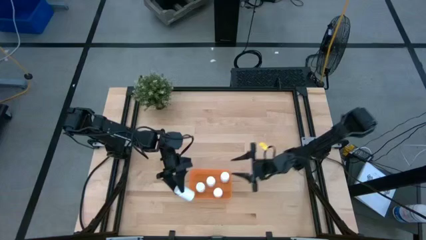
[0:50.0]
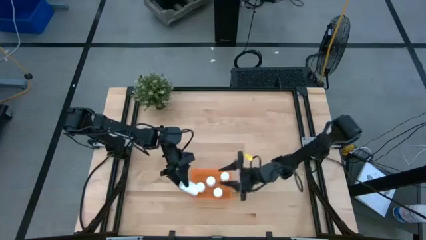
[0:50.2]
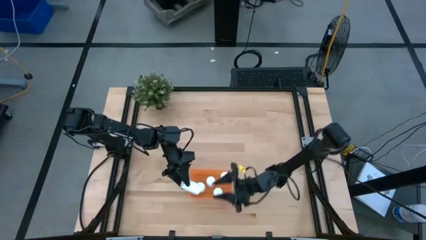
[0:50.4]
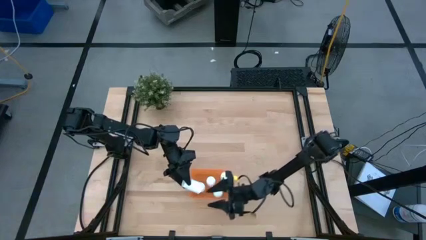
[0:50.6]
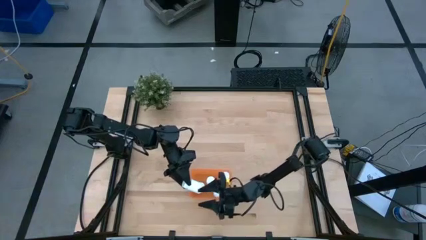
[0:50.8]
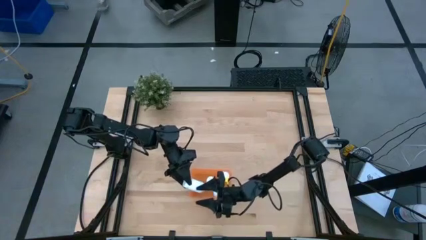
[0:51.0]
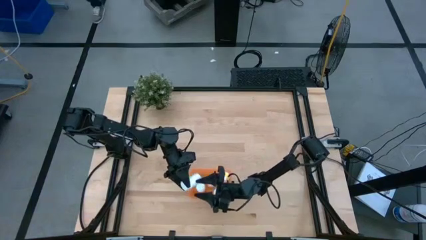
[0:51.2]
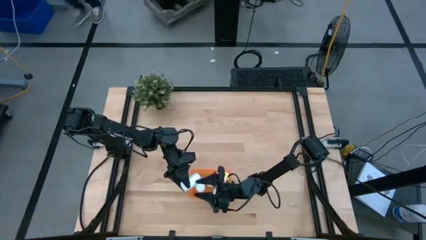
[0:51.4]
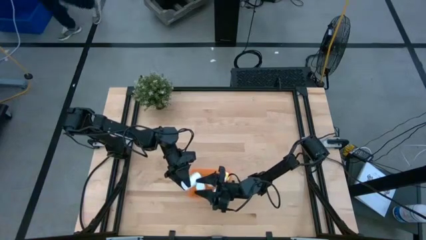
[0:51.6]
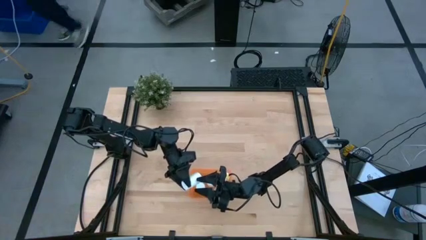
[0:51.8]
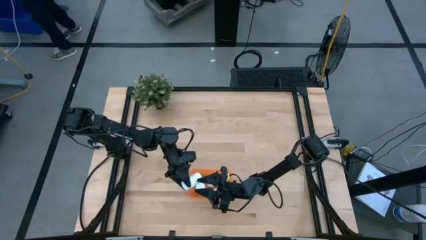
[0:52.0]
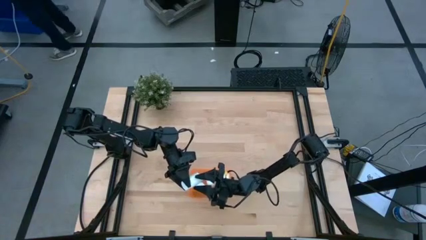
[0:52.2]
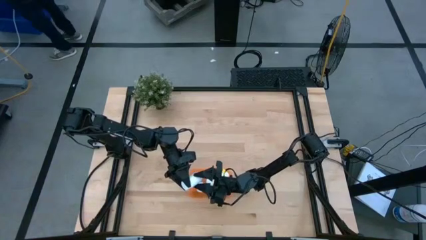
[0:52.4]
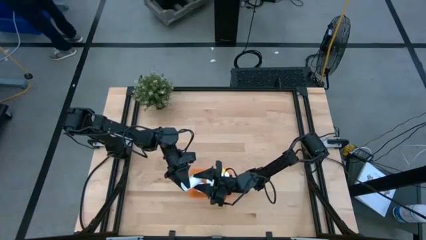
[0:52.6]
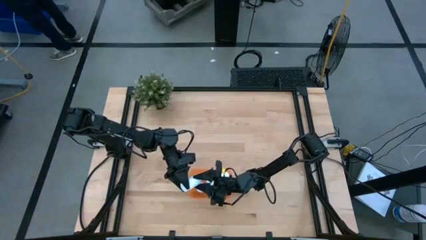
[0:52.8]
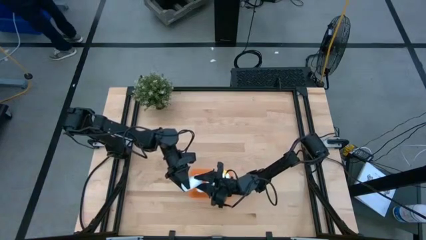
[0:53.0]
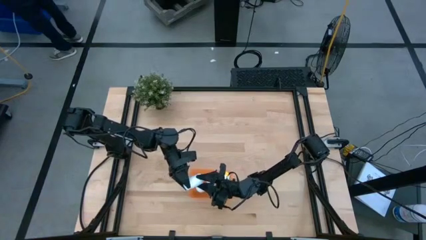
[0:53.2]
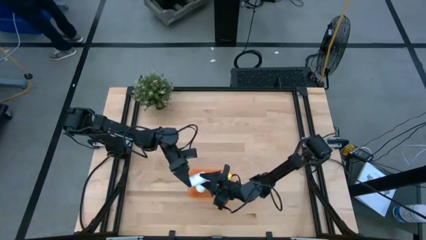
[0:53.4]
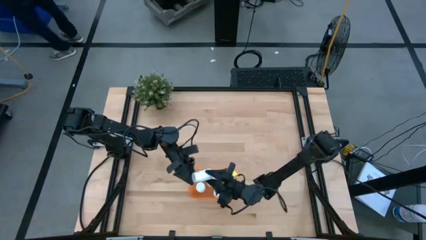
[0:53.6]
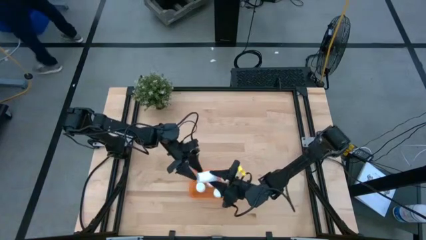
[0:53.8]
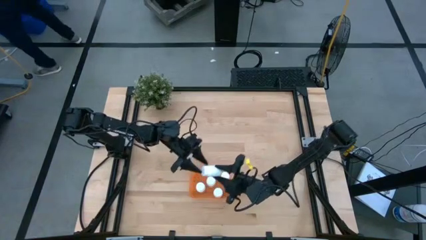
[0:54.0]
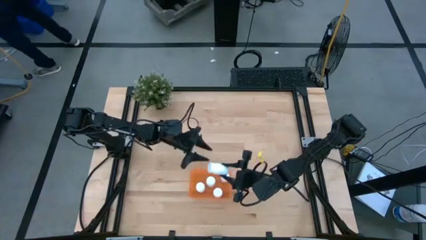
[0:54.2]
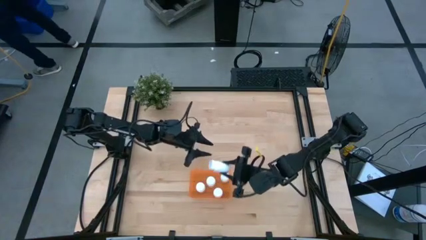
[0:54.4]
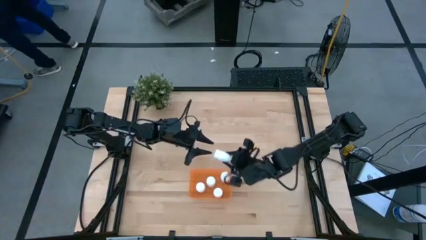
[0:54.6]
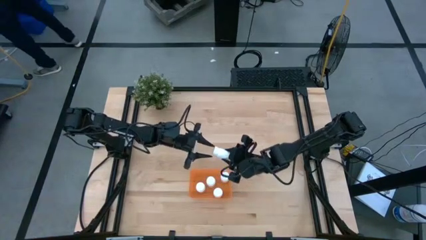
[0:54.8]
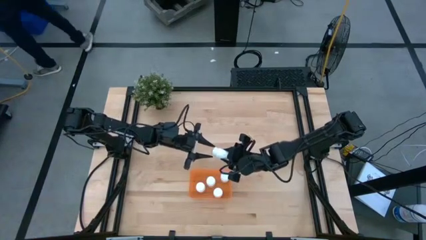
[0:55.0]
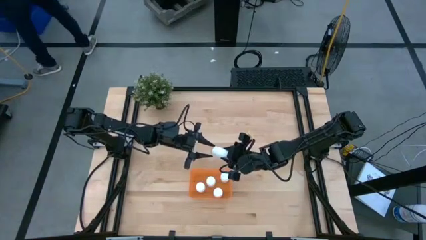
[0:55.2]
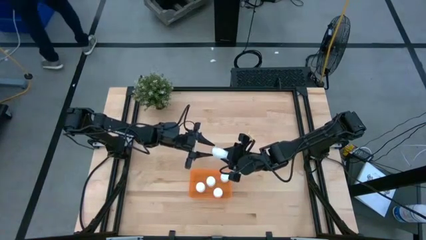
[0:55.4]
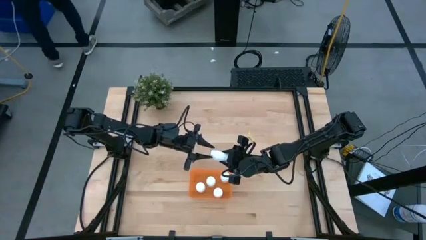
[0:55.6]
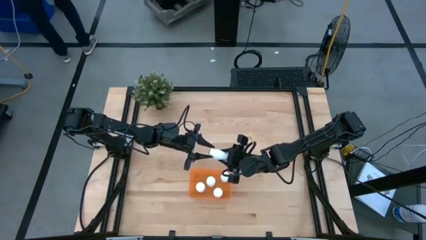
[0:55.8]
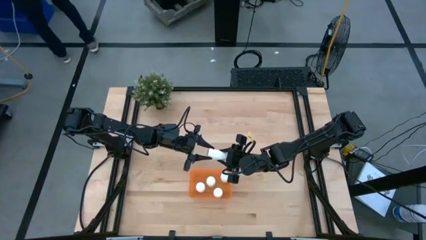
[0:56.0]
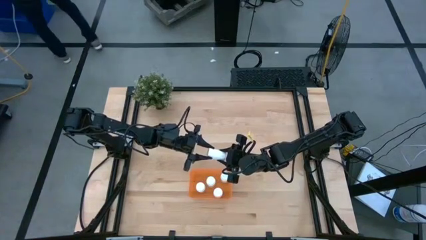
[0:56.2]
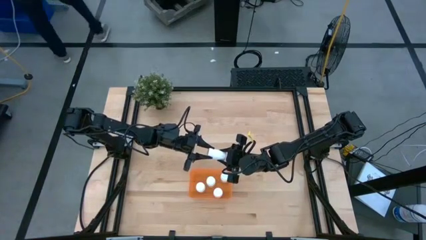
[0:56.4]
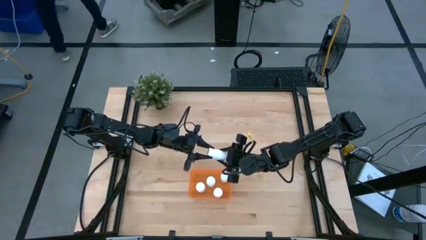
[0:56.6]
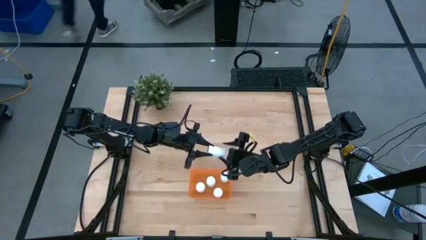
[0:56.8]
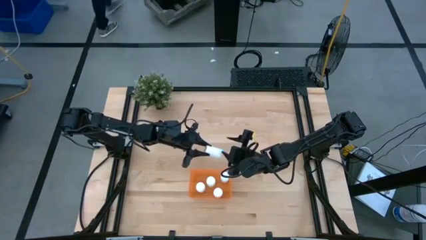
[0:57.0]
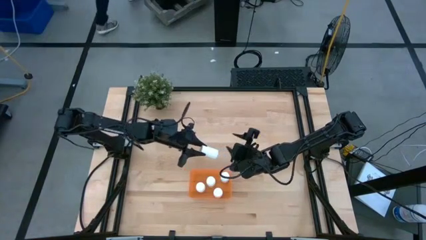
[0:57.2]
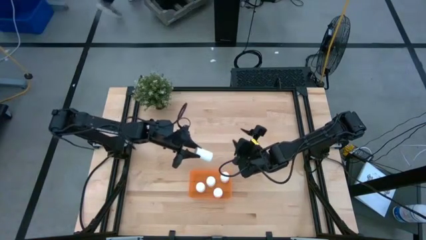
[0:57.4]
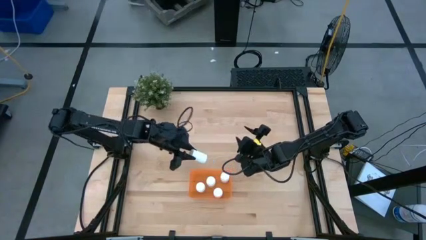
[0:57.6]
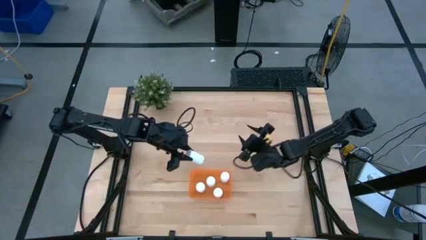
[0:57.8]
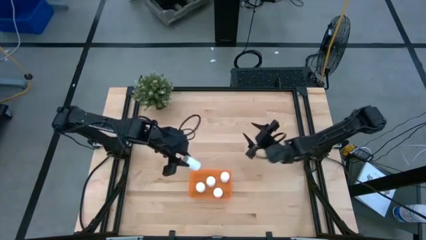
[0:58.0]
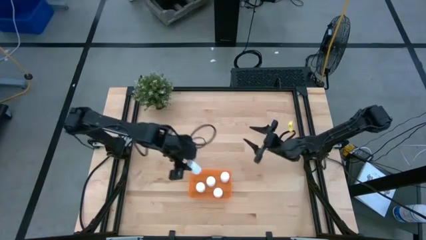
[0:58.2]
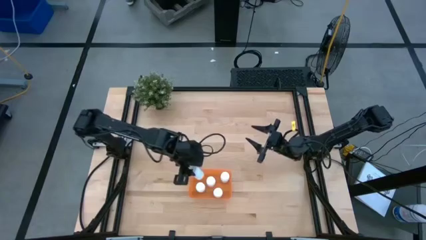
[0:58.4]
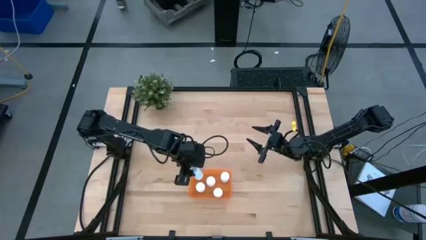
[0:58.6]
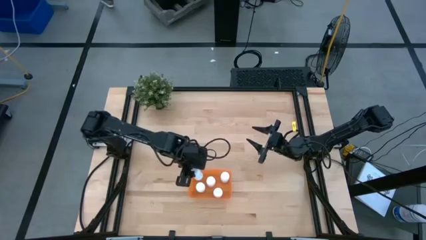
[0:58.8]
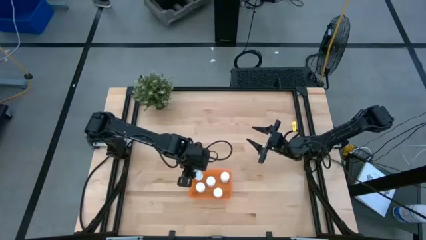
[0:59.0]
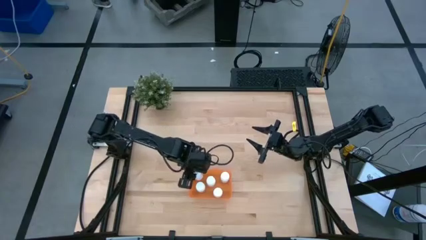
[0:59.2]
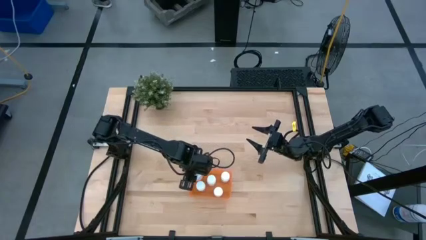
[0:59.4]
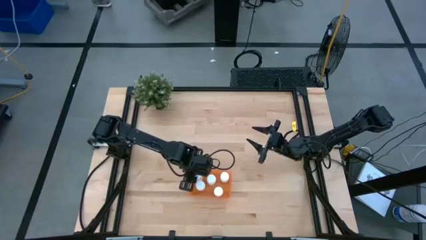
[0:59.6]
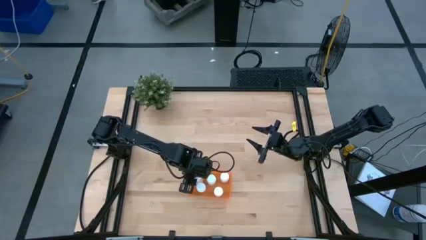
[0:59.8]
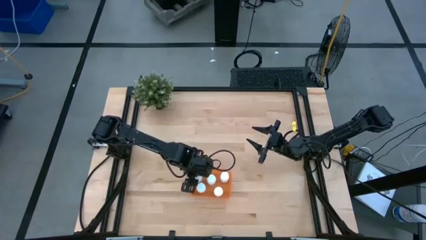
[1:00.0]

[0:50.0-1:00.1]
Task: Pick and place pill bottles into a basket
Put the white medicine bottle into the orange bin
